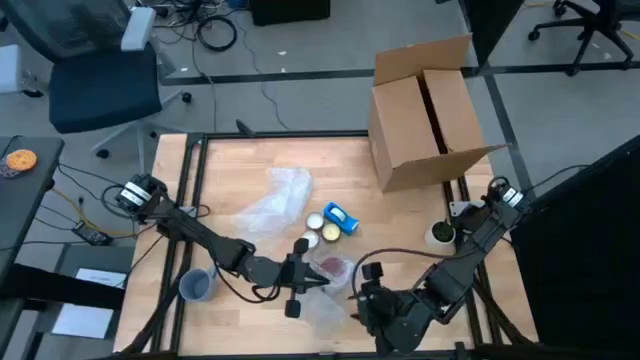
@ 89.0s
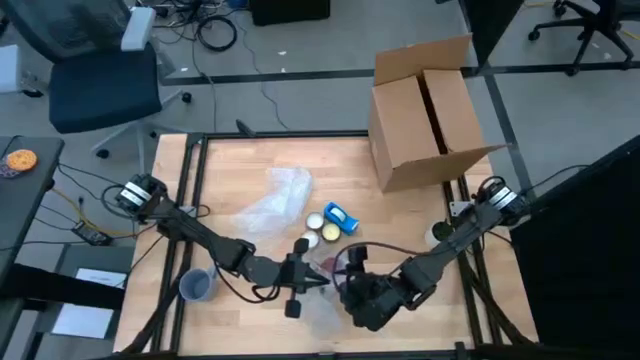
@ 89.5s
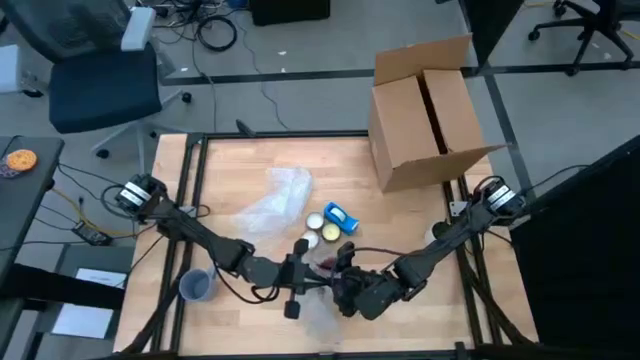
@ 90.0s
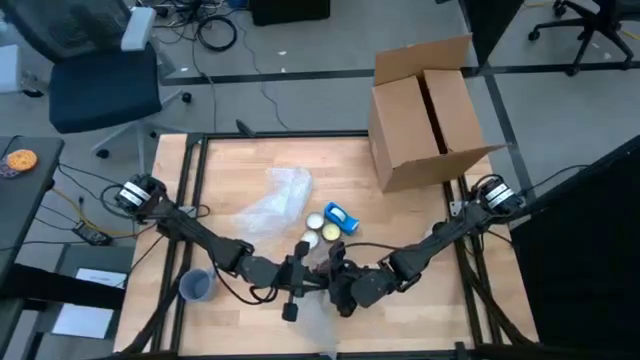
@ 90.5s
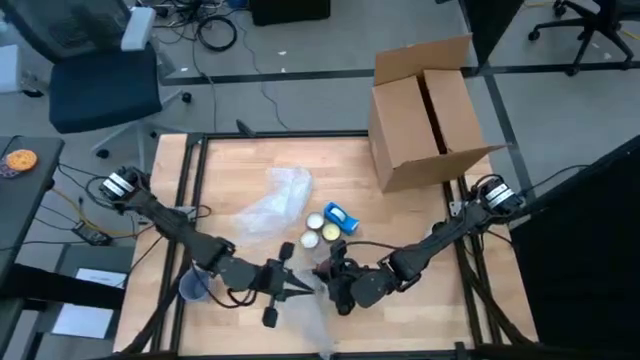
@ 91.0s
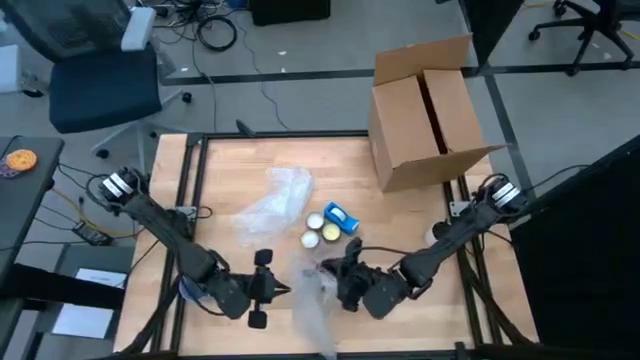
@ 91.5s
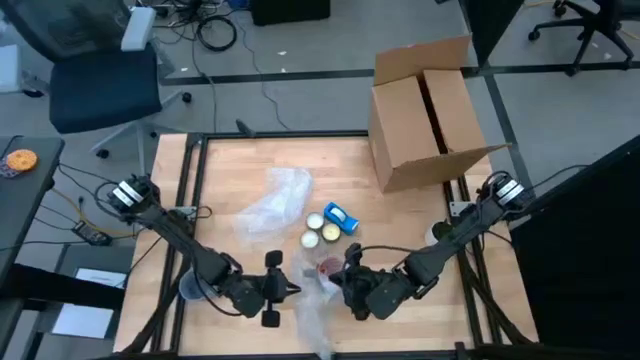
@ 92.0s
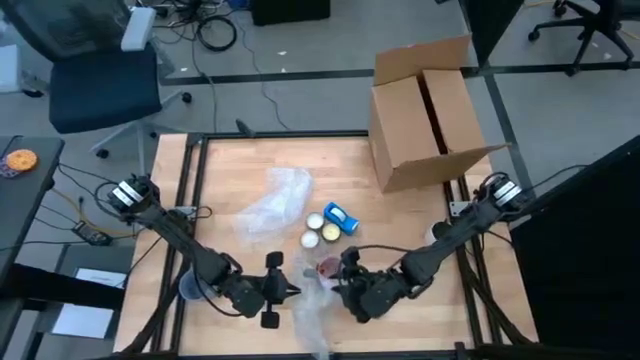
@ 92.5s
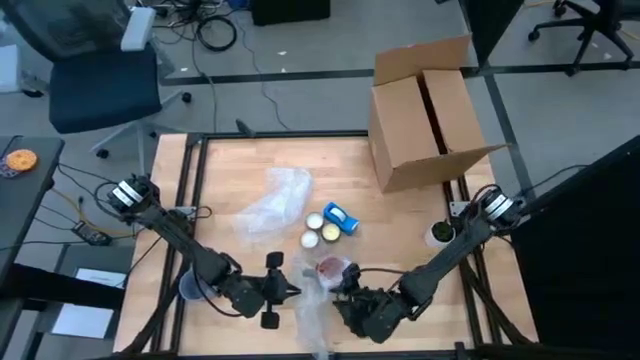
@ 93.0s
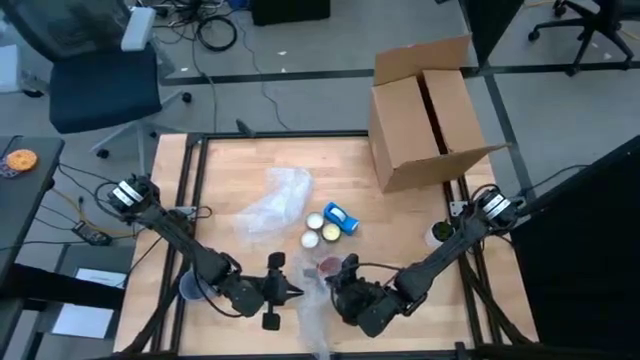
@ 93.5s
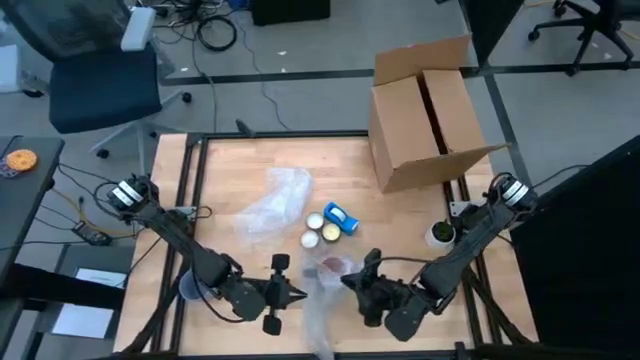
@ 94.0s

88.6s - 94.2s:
Task: wrap mug
Wrap the black mug with the transparent bubble wrap

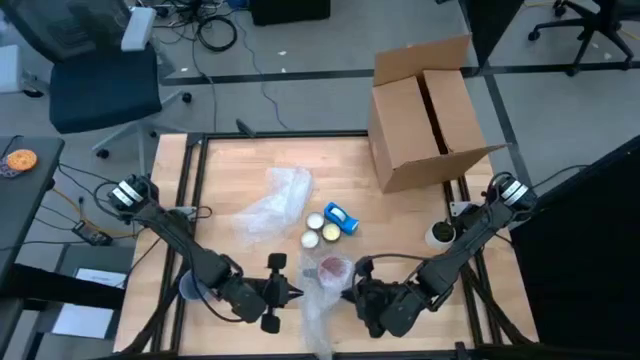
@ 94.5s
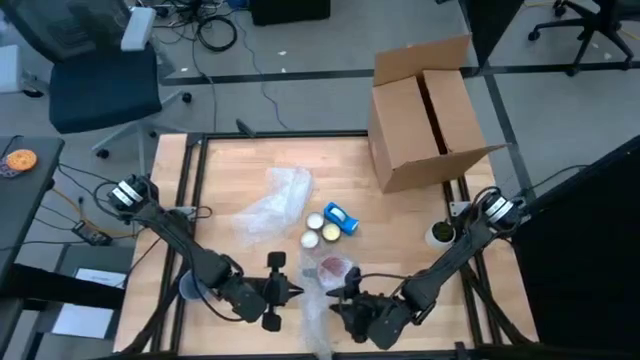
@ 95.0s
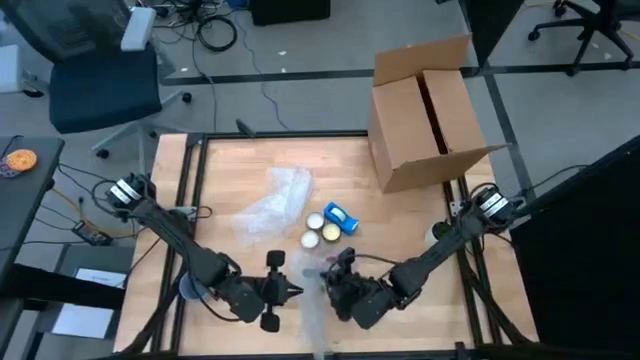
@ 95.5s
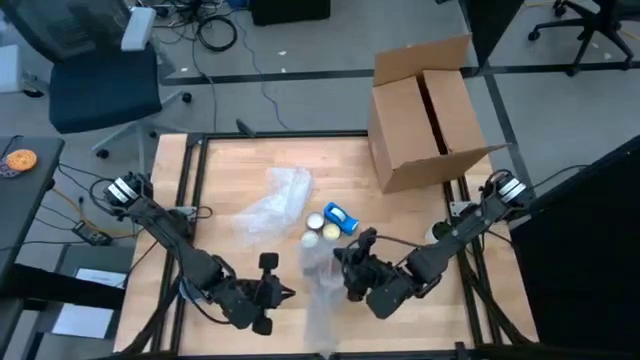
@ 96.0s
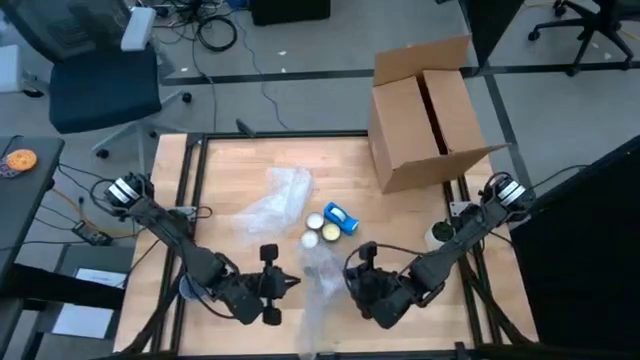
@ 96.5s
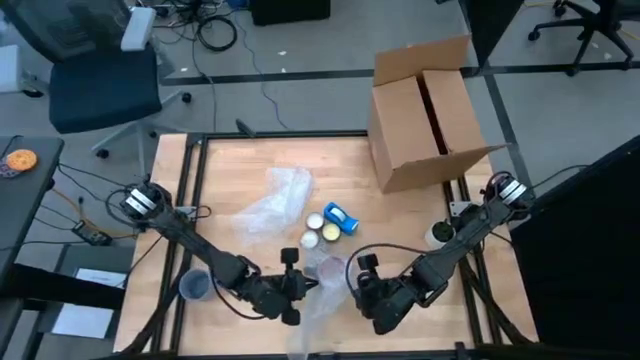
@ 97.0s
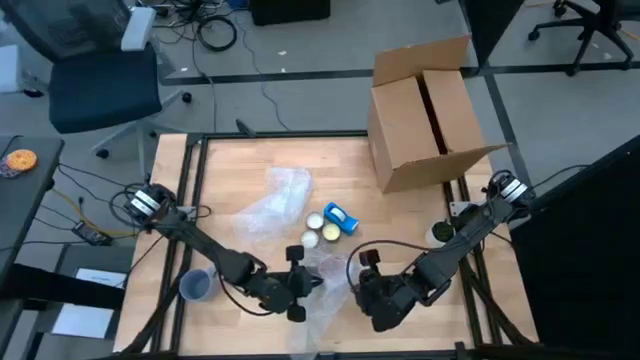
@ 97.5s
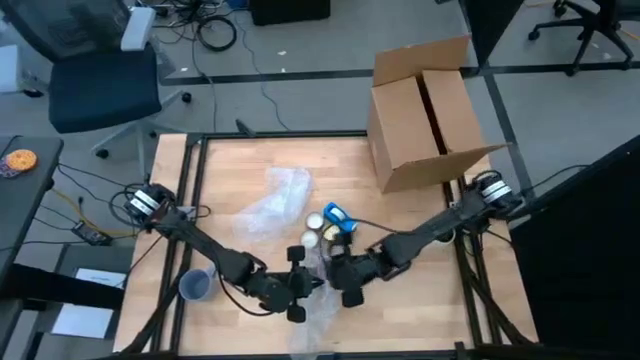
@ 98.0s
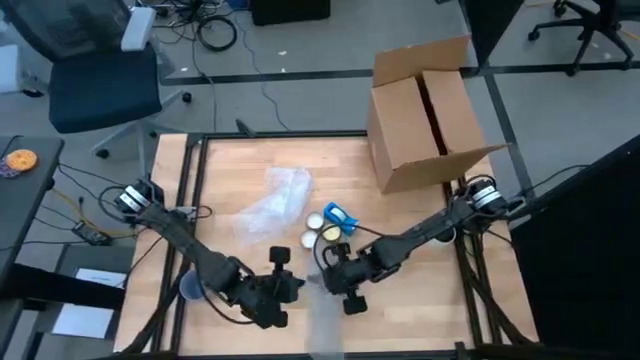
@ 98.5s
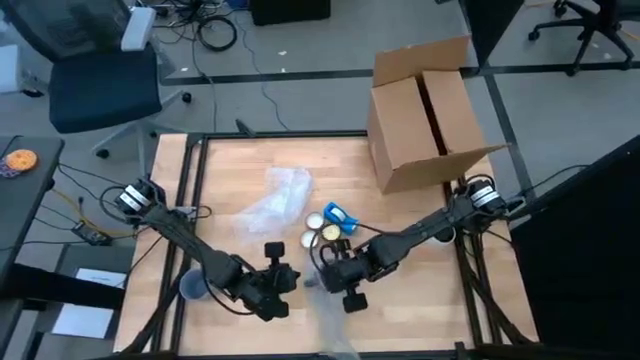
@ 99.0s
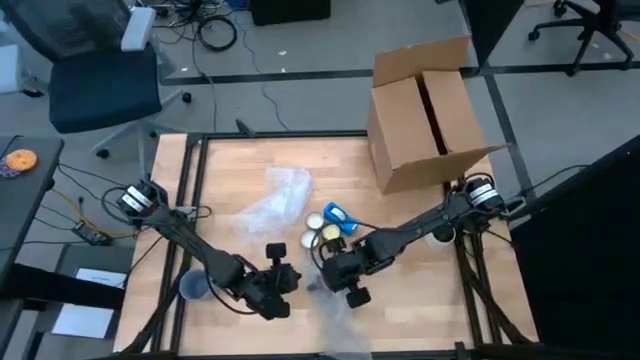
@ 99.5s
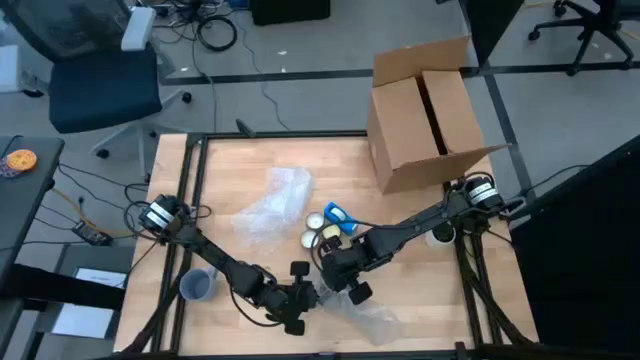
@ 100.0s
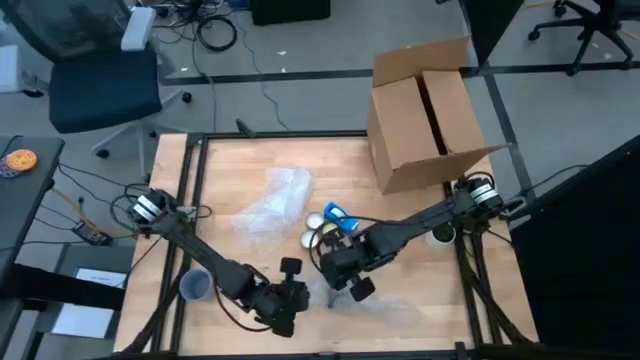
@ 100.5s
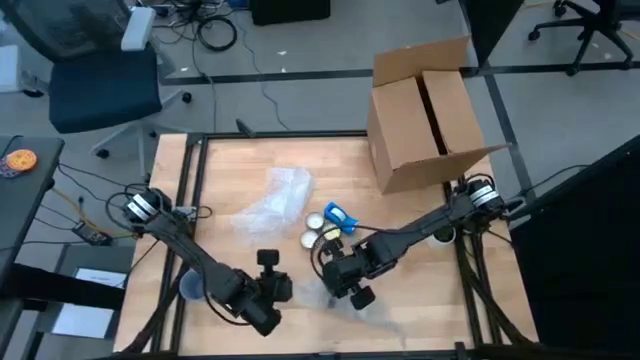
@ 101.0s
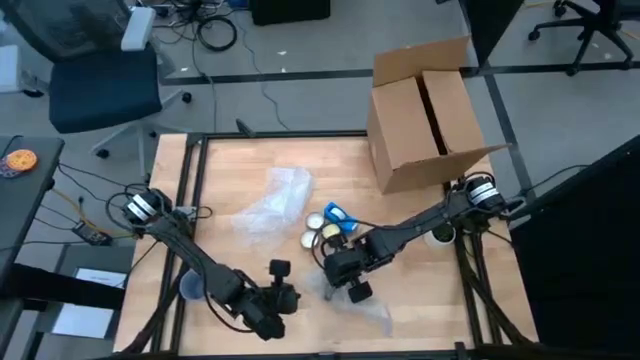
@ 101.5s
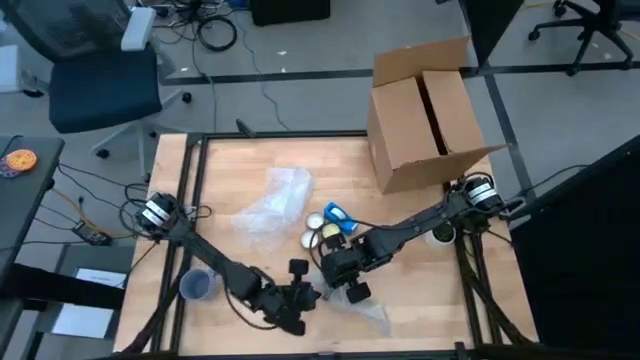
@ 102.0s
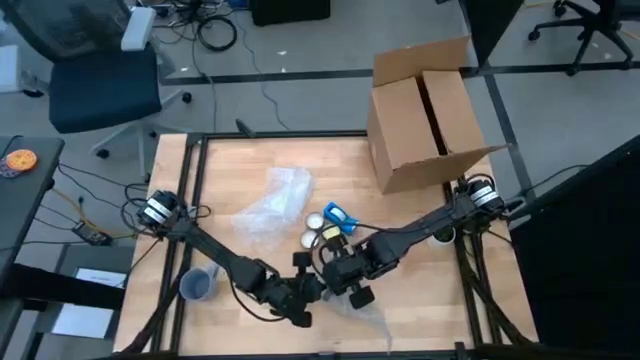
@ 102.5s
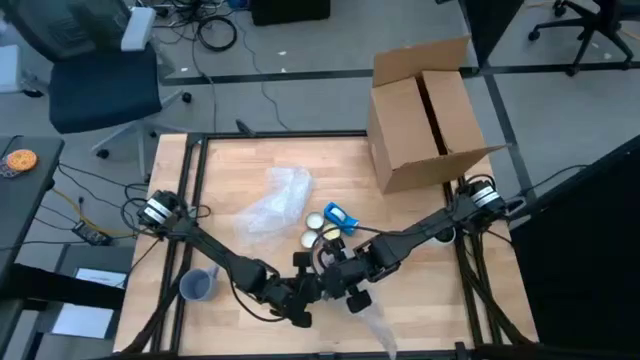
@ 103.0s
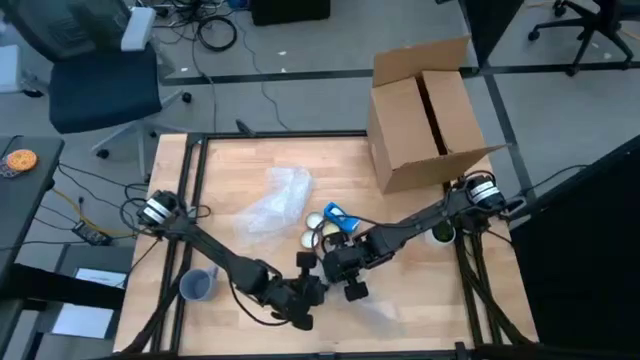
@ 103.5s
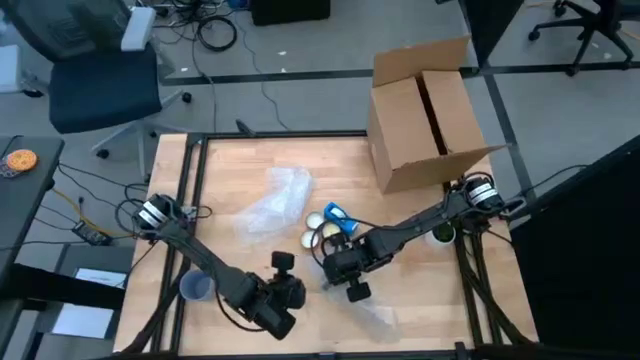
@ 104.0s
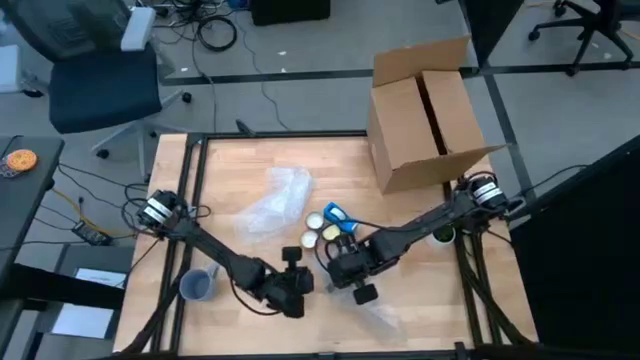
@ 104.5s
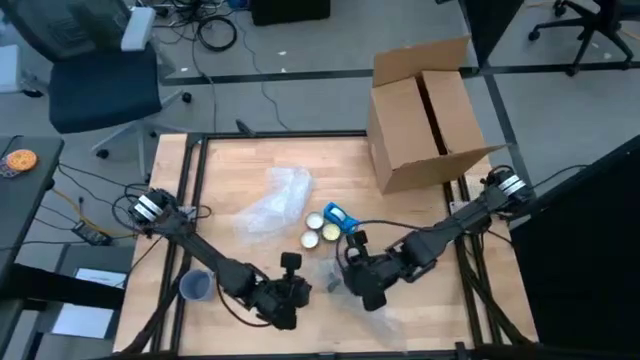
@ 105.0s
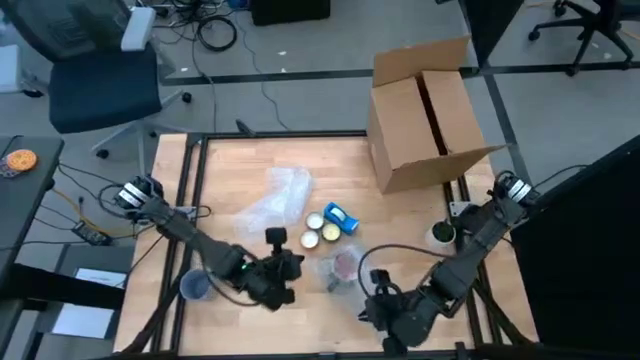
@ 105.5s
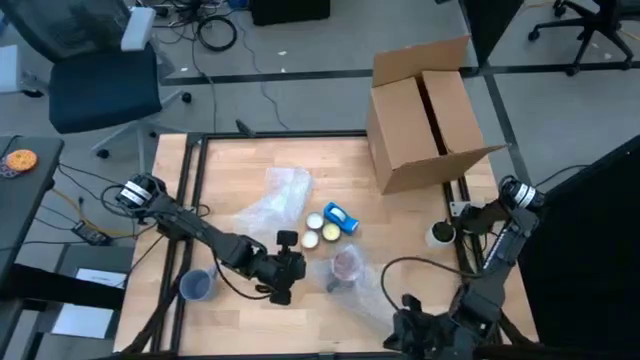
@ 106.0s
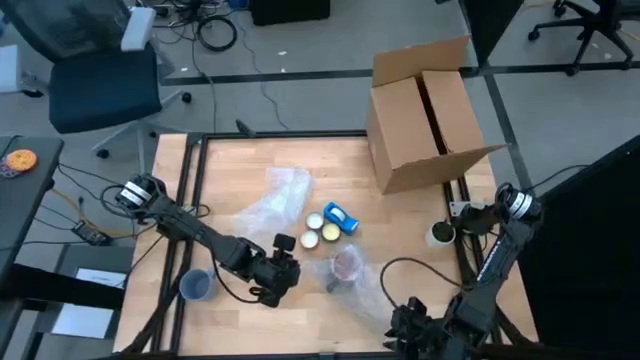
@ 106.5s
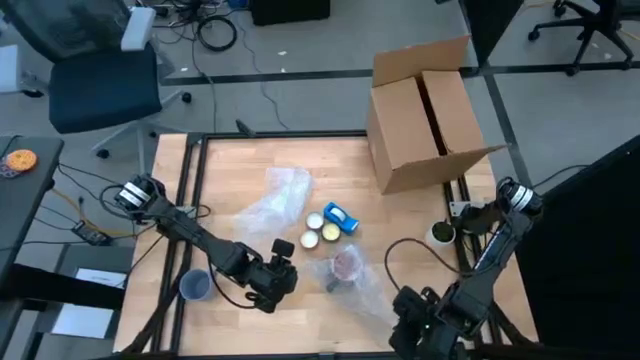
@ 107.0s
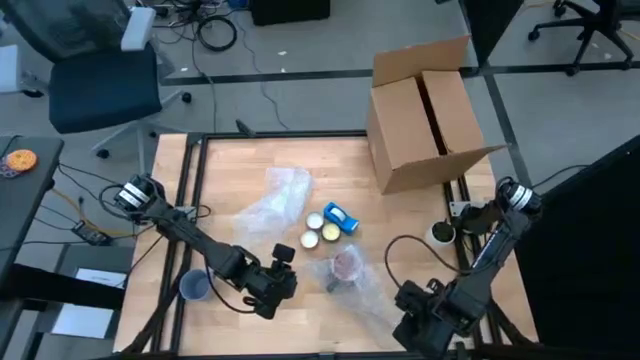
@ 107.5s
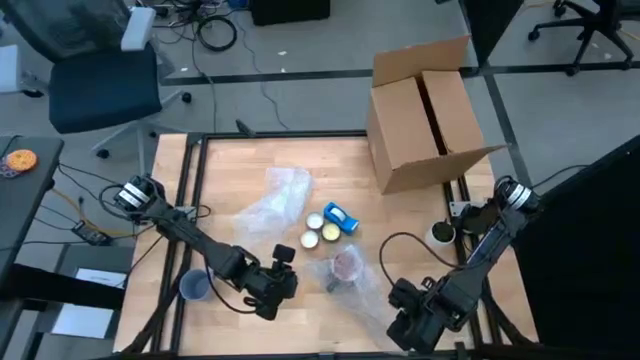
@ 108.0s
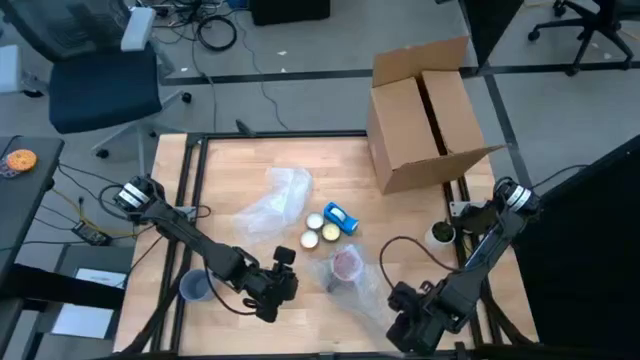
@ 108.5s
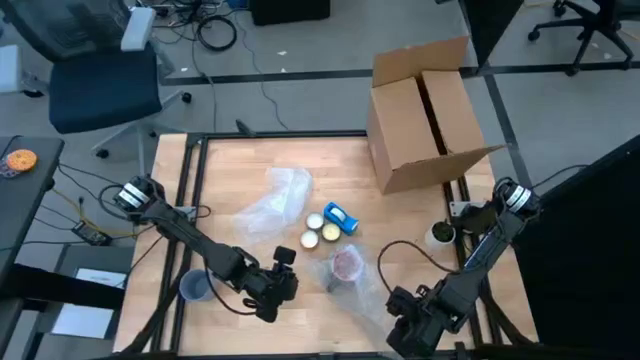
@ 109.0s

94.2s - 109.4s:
Wrap the black mug with the transparent bubble wrap

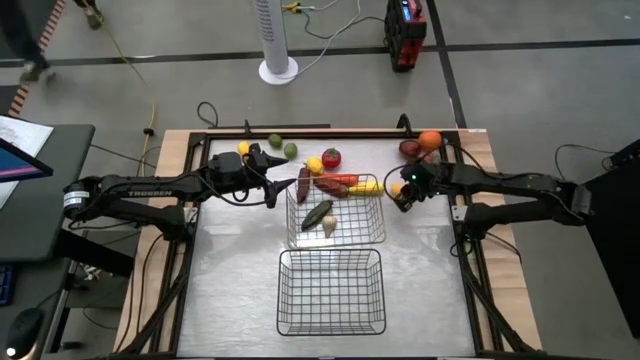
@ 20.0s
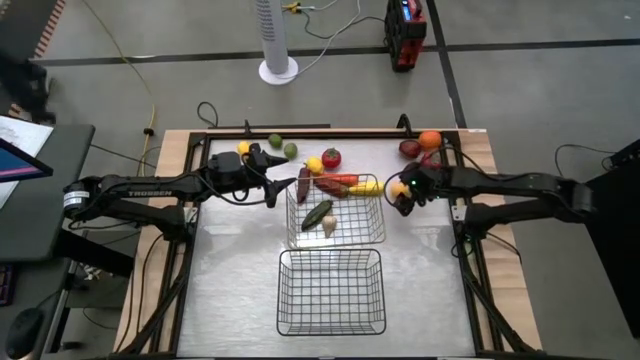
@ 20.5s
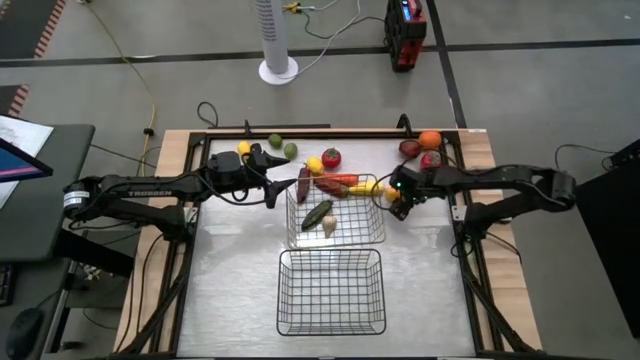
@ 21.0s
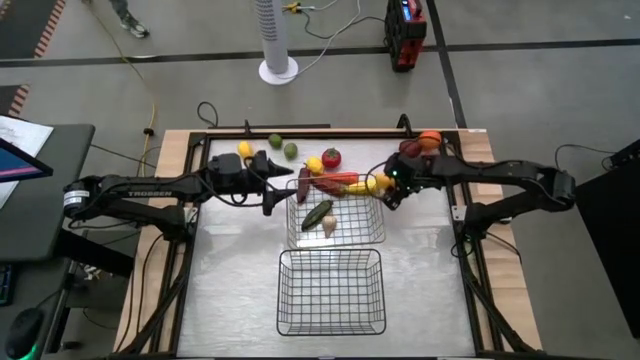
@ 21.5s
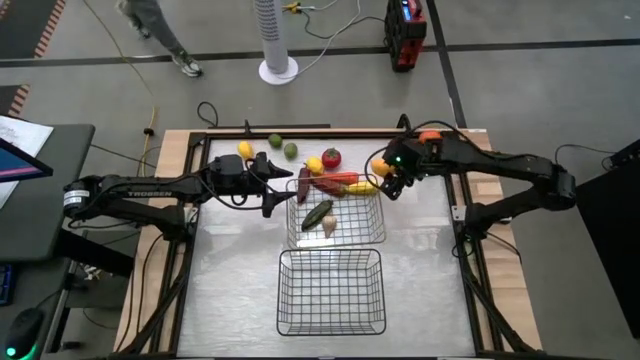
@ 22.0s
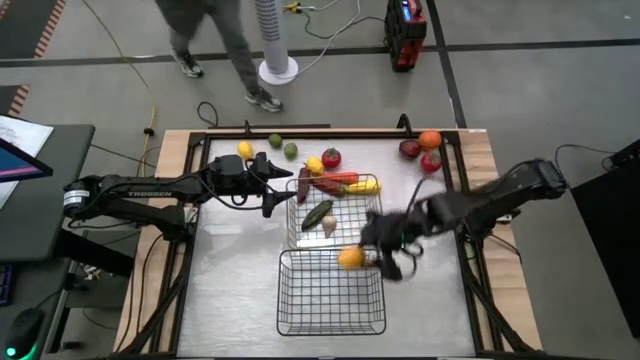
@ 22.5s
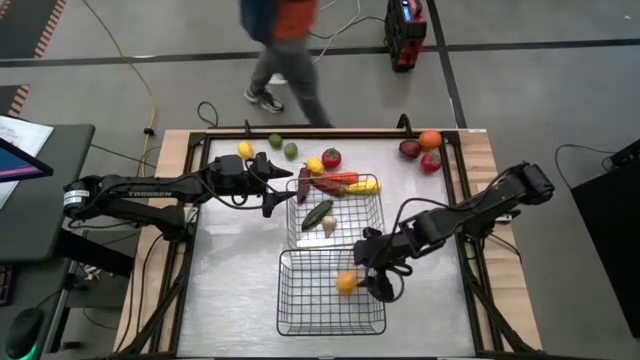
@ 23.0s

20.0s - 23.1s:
Task: Sort produce into baskets
Put the lemon into the bottom wire basket
